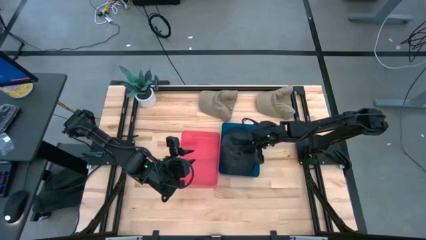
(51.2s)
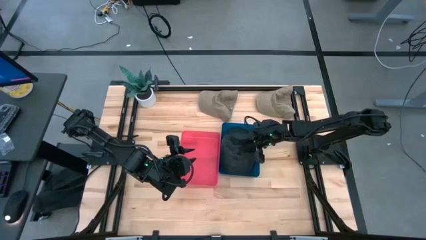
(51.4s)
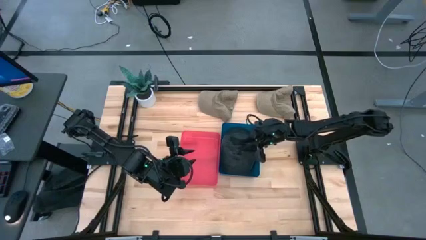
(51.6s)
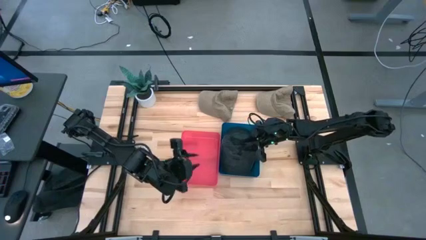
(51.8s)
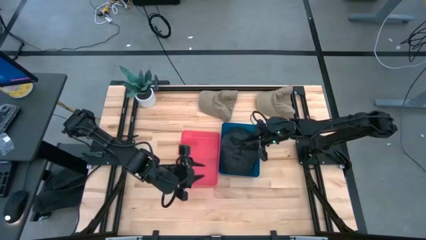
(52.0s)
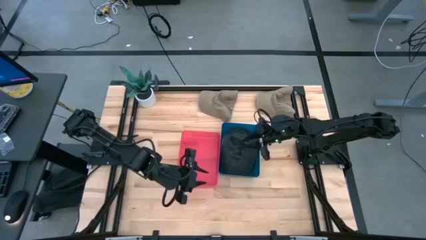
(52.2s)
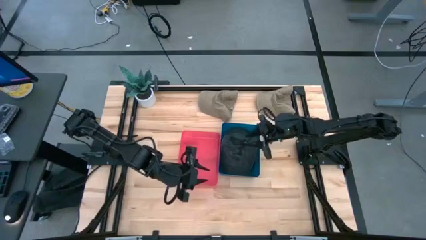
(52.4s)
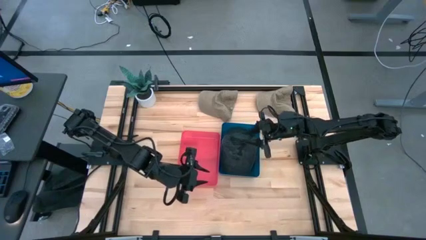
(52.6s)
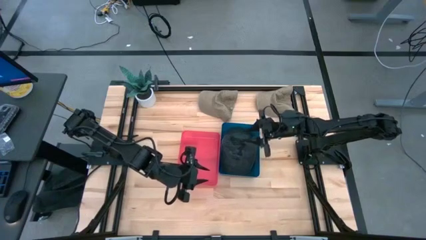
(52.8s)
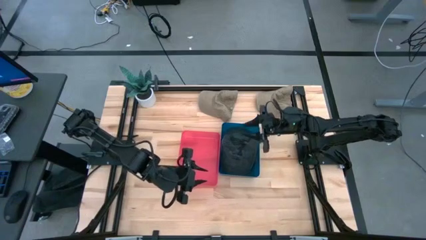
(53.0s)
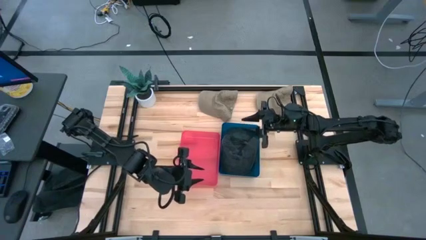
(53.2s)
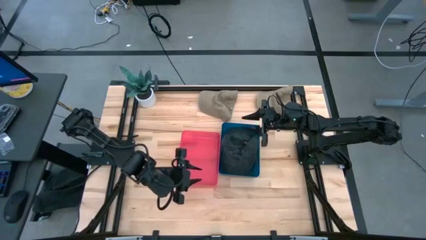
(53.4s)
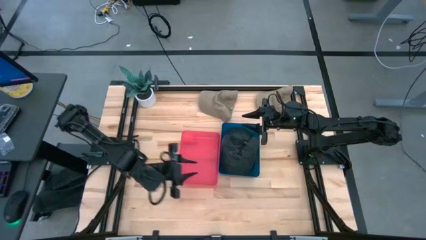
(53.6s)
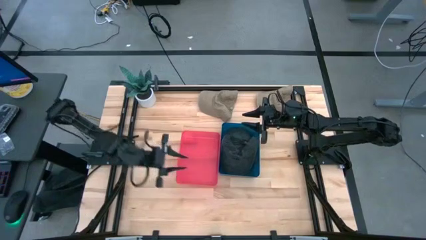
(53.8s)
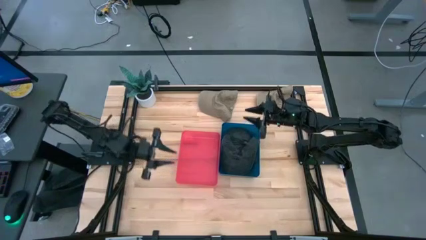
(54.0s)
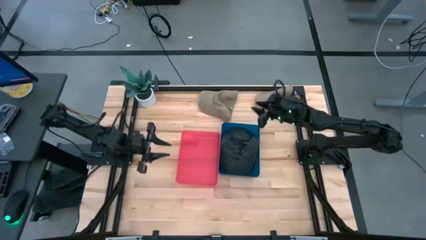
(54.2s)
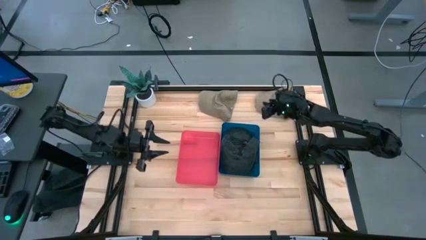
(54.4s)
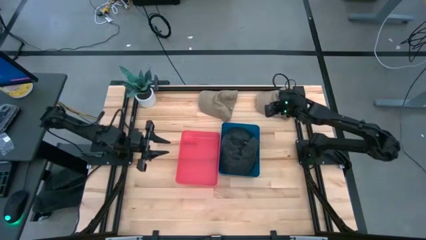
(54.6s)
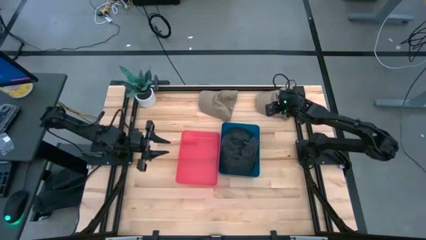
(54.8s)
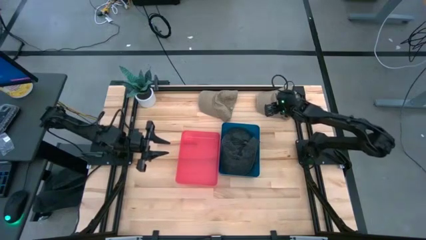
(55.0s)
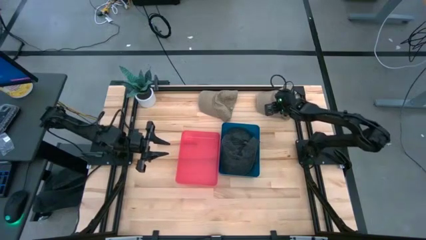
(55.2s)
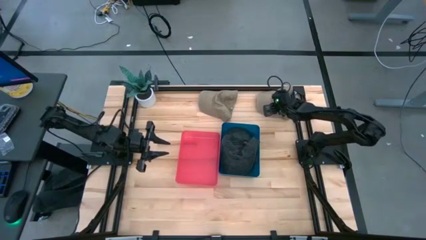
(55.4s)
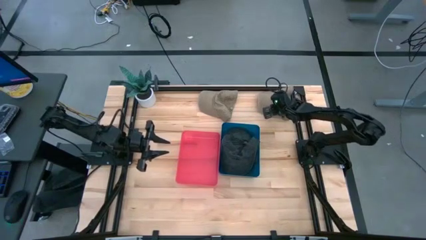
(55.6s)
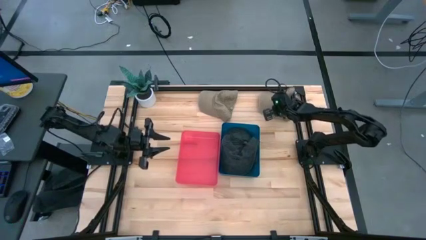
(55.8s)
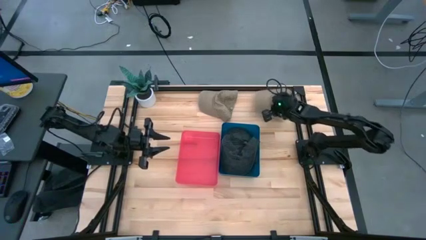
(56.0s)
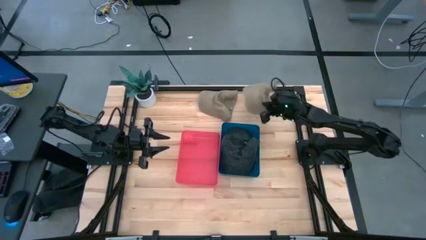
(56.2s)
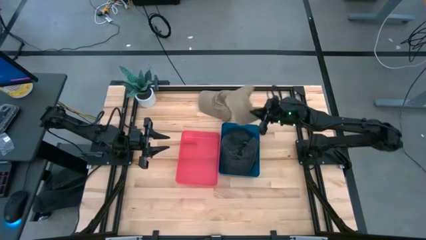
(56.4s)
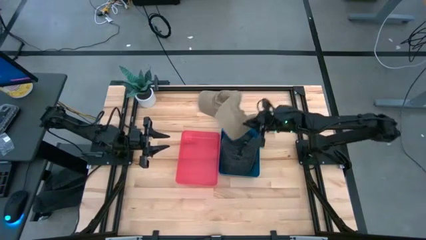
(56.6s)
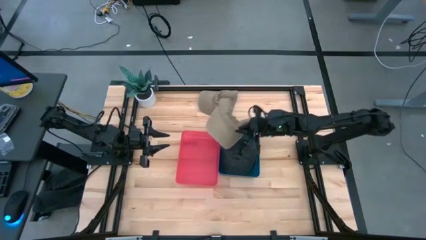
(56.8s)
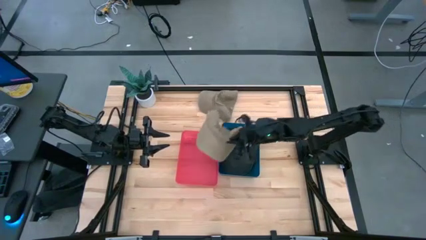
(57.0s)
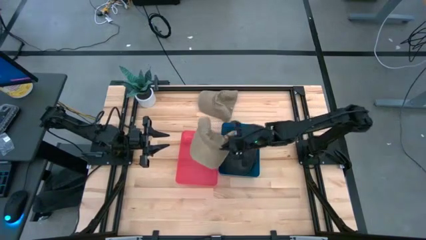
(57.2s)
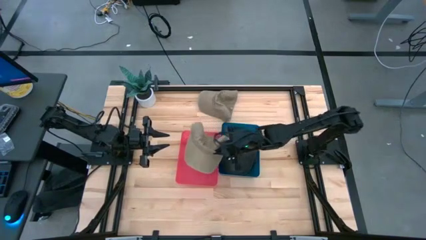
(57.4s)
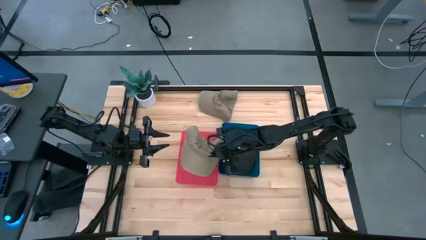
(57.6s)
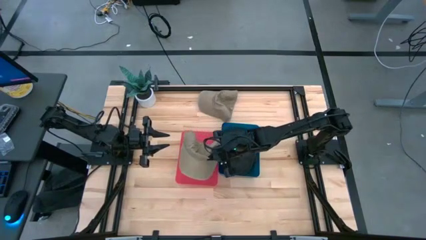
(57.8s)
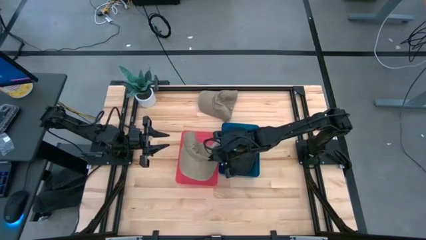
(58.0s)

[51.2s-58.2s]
Task: Pick & Place hat
Put the right brown cap into the red bin

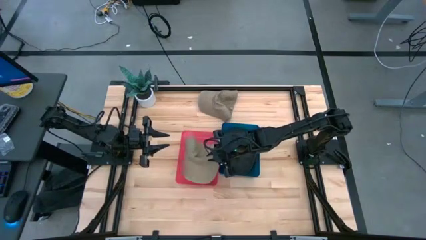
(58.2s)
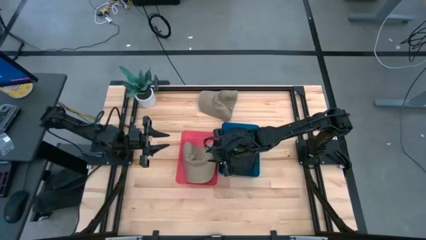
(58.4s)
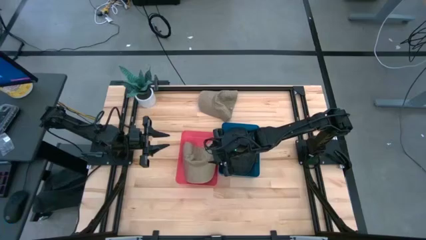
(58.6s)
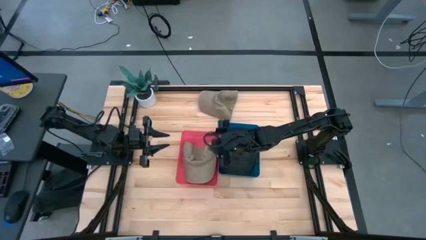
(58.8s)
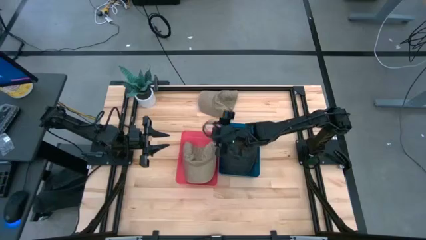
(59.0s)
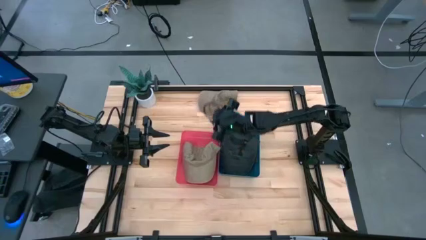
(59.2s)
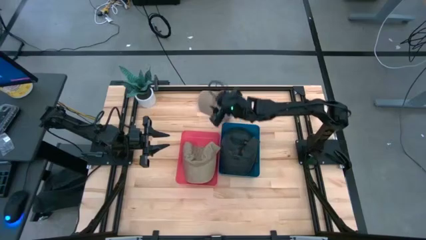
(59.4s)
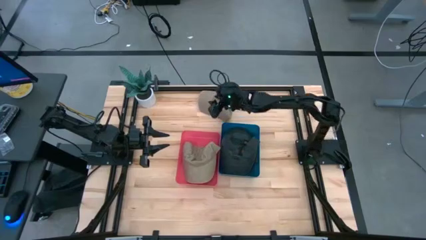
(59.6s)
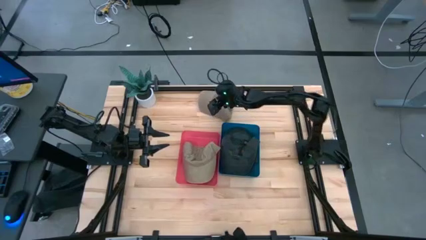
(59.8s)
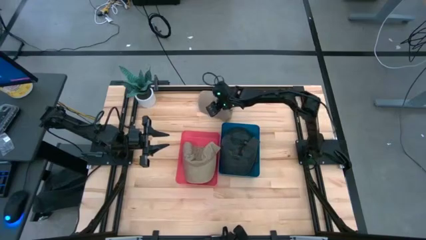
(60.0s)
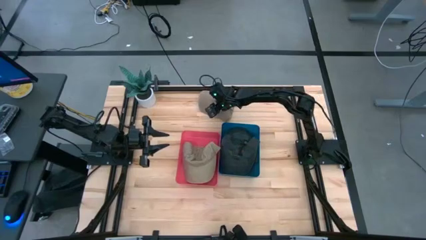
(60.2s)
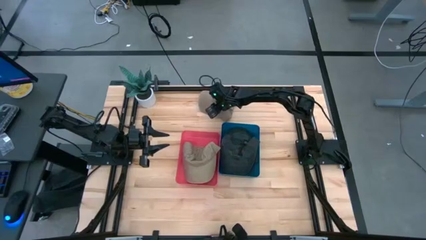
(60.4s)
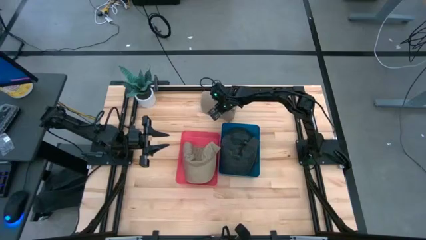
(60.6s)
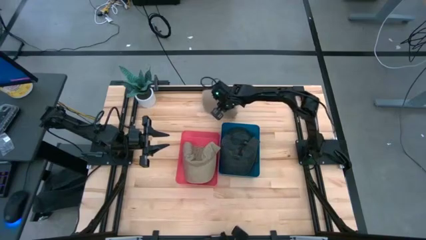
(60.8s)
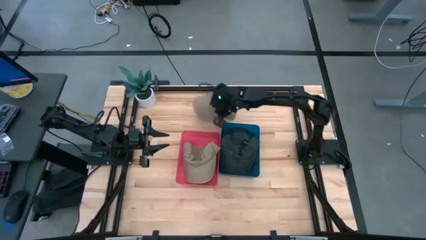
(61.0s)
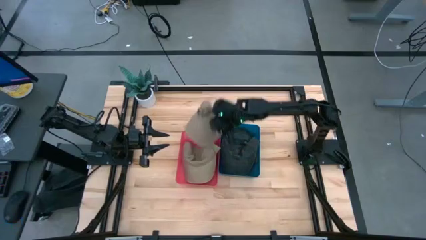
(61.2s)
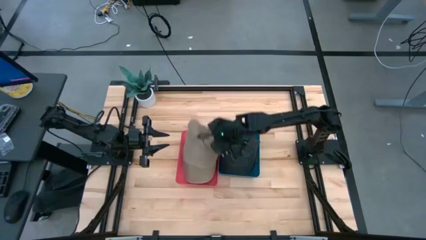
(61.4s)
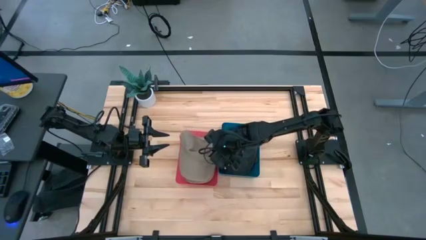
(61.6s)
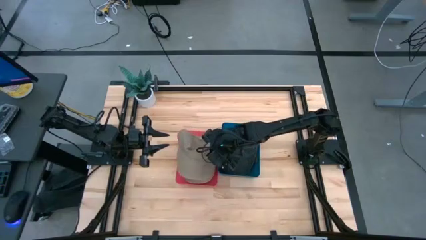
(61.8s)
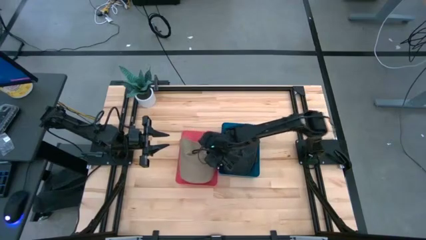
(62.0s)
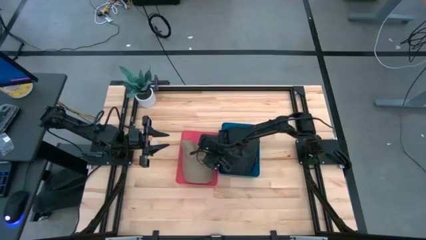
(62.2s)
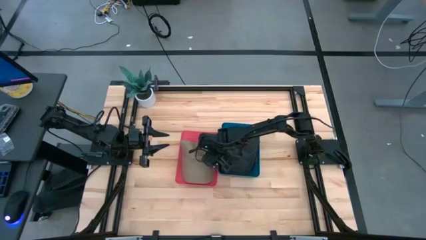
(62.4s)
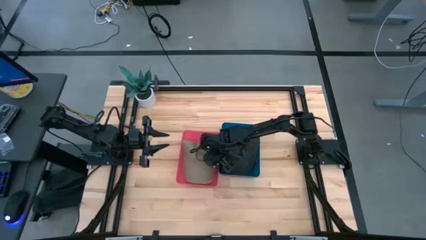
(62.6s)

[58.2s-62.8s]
Put the brown cap into the red bin

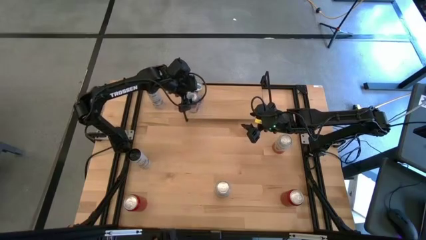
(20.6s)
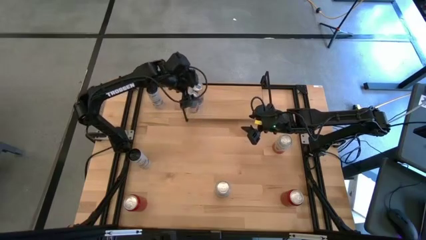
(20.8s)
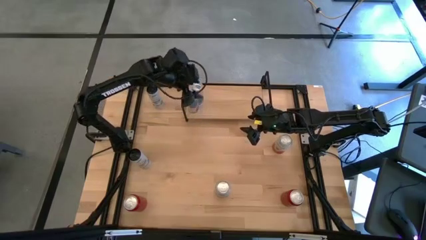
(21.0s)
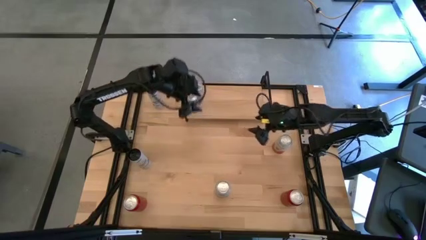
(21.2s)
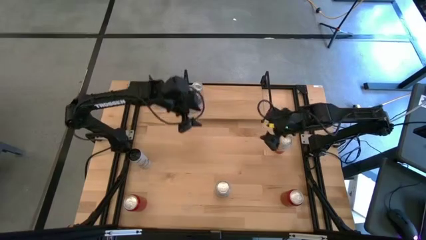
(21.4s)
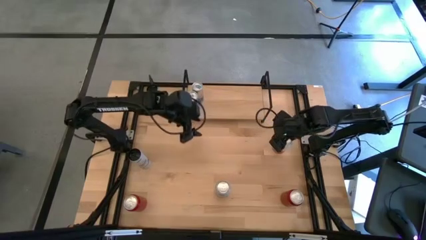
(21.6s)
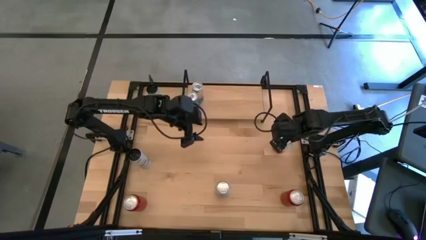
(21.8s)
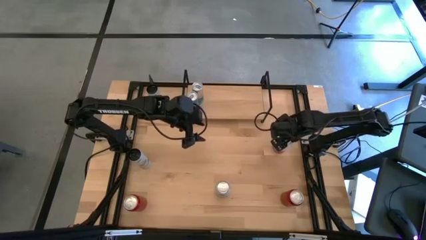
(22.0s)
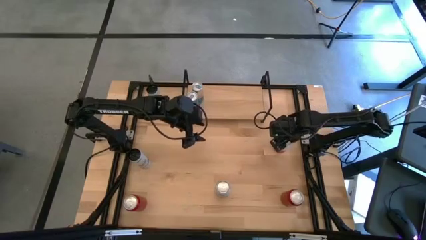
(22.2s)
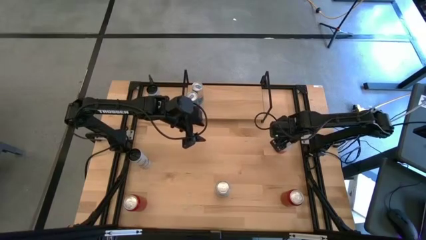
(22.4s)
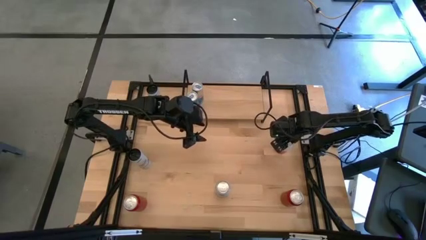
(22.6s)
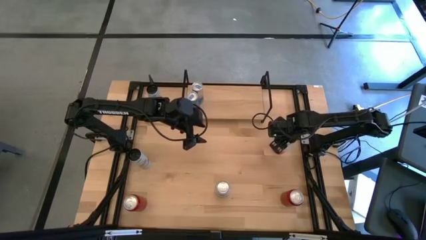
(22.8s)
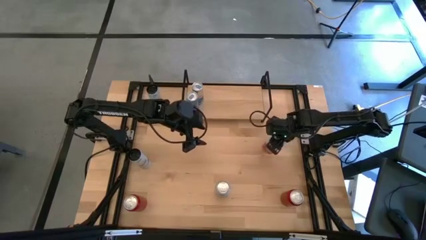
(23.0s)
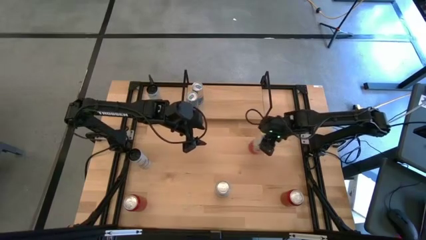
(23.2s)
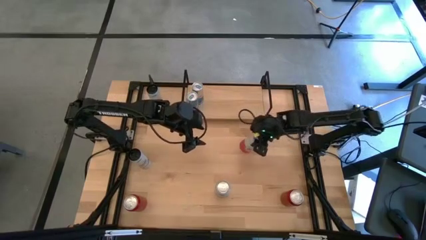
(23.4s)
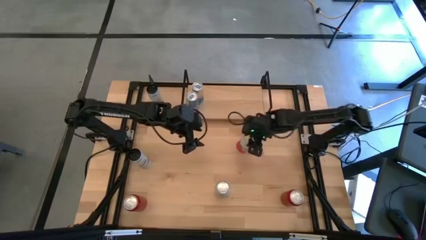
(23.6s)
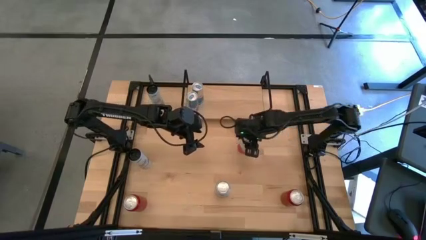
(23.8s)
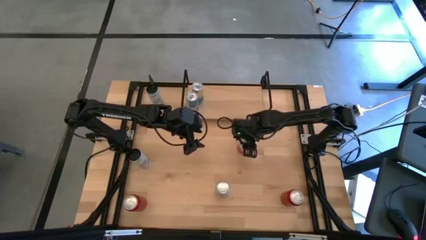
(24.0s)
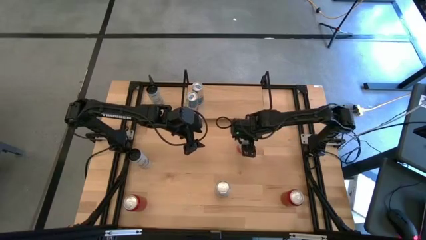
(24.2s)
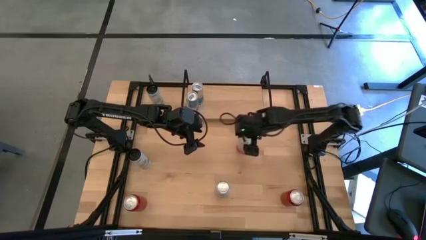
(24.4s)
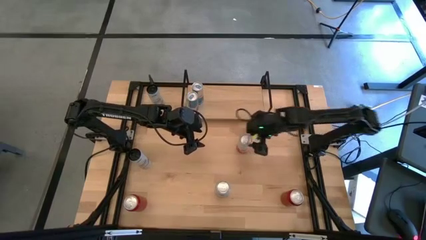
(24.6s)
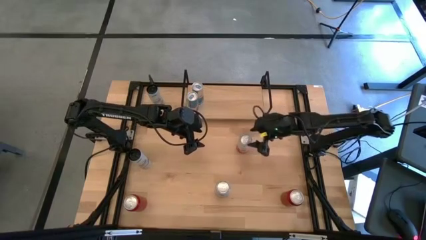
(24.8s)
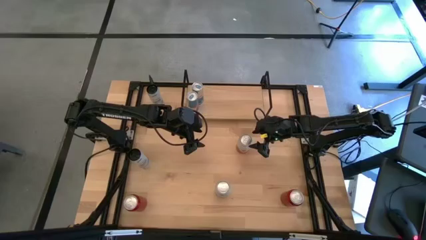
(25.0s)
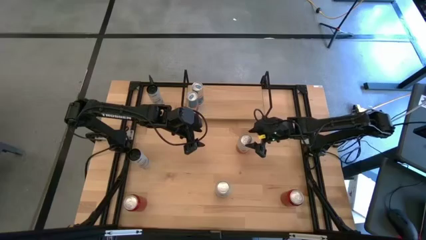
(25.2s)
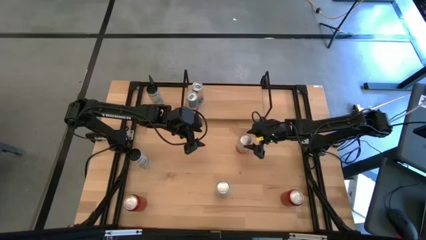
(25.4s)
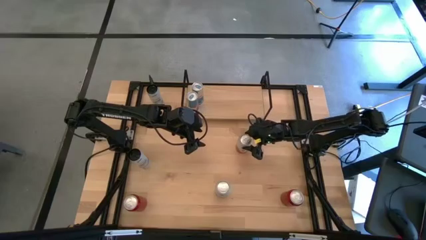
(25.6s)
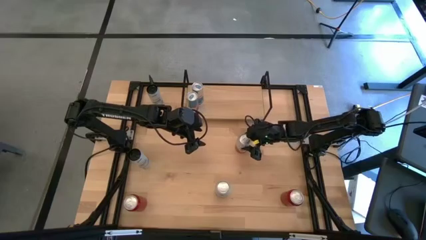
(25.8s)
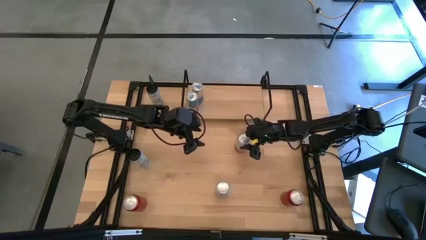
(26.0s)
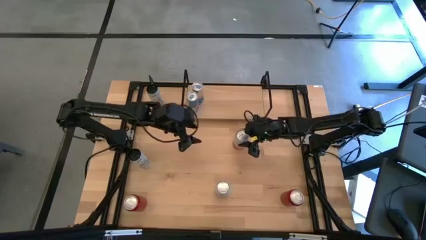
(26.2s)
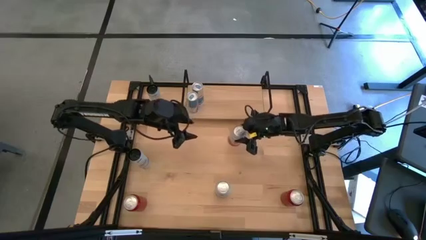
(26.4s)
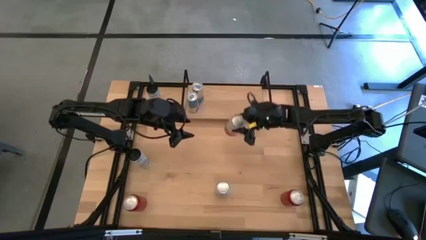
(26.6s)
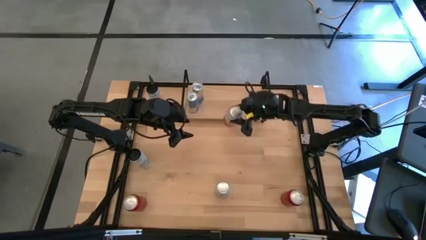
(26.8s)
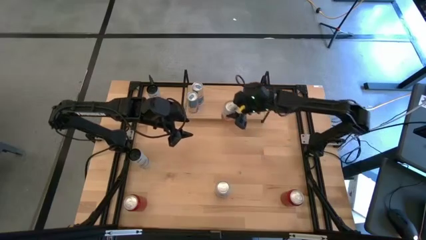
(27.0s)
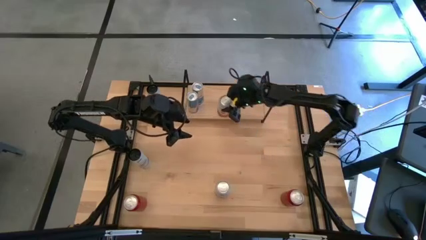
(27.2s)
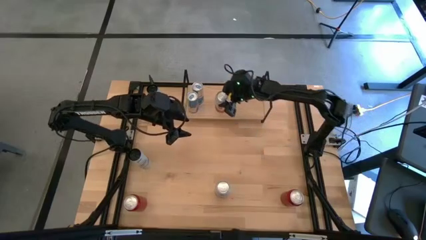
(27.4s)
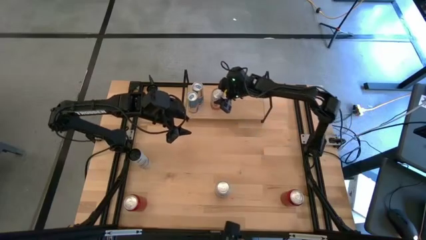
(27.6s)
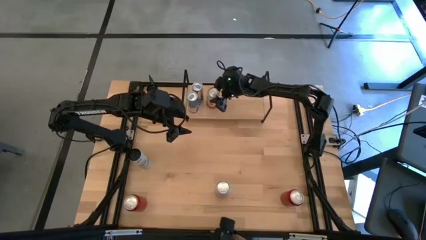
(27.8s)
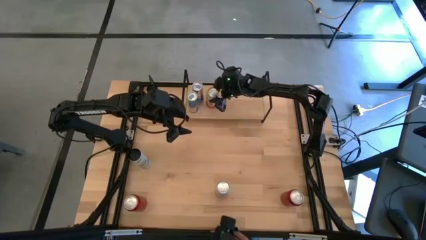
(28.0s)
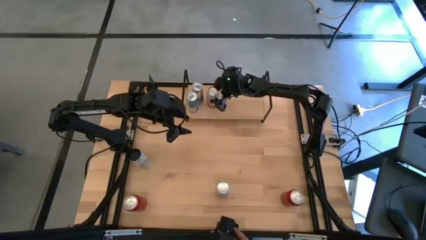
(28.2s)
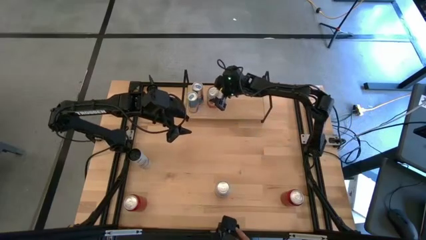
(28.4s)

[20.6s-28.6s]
Task: Place canned beverage on shelf
Put the top pink soda can on the shelf
